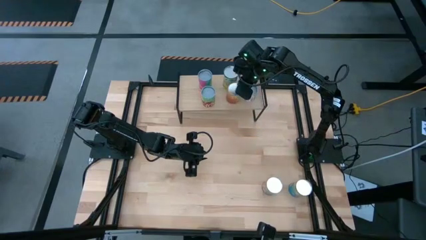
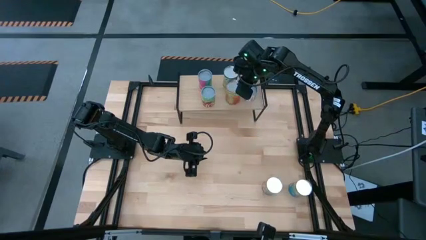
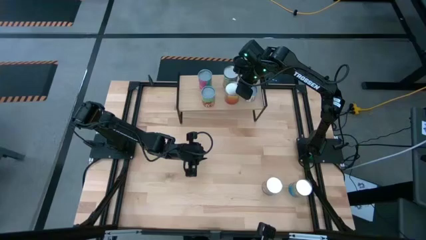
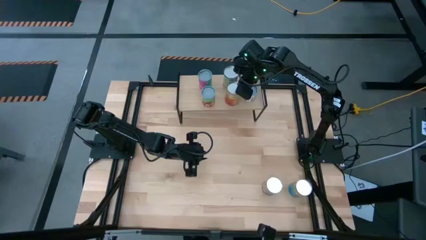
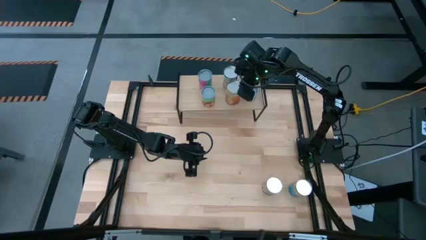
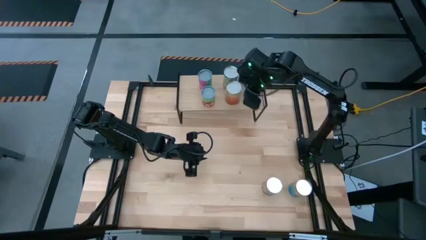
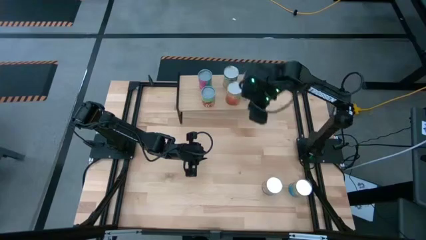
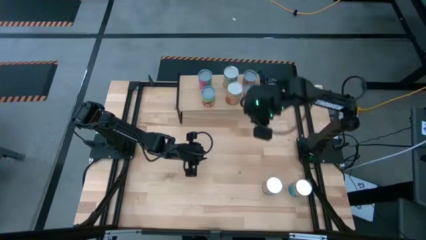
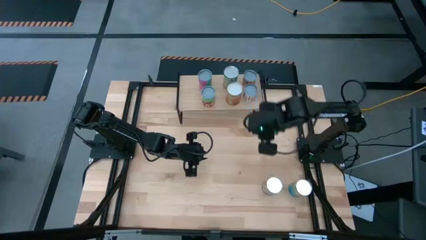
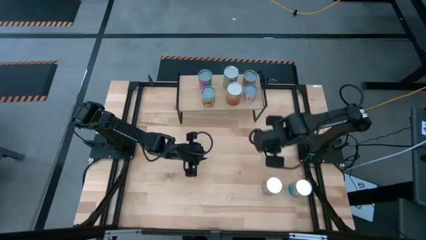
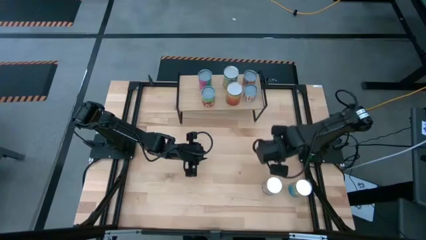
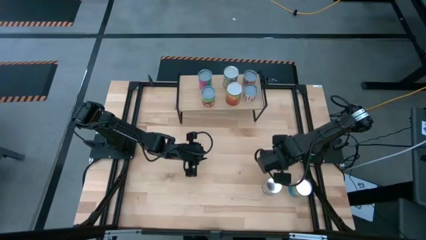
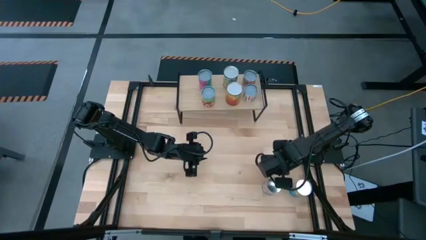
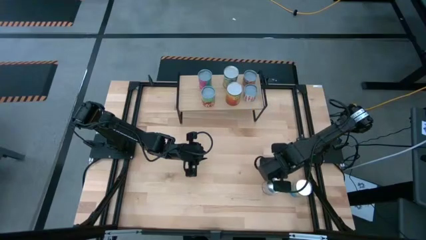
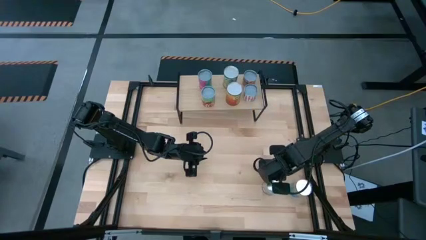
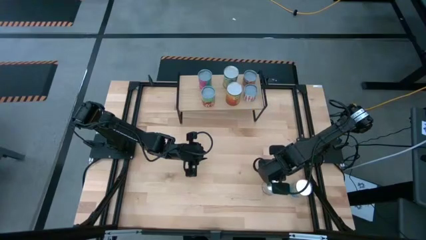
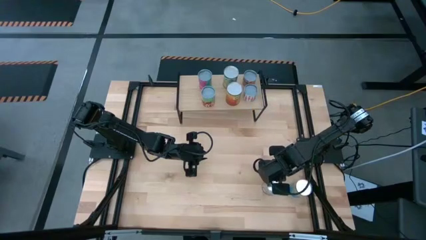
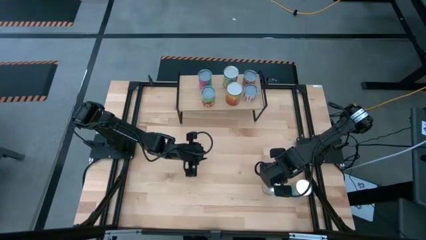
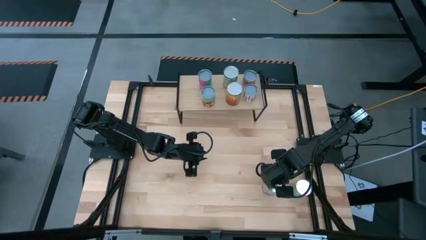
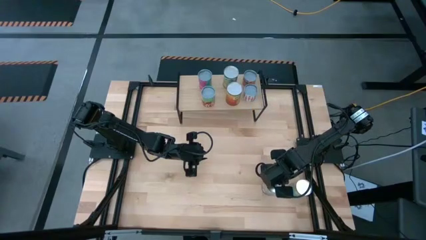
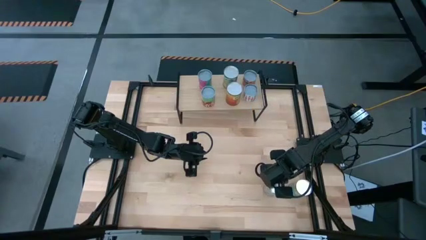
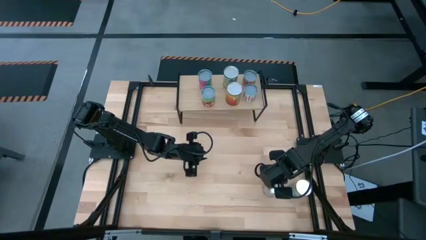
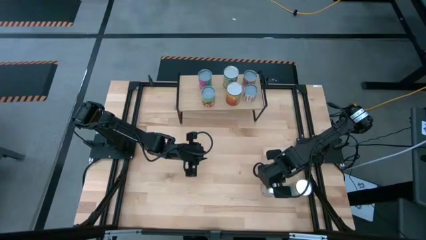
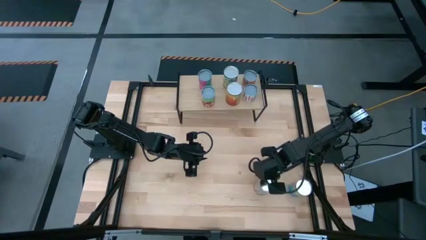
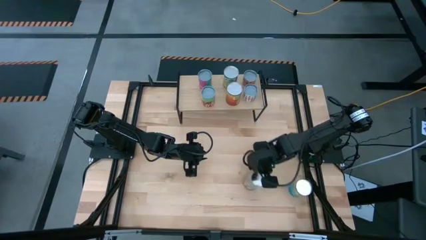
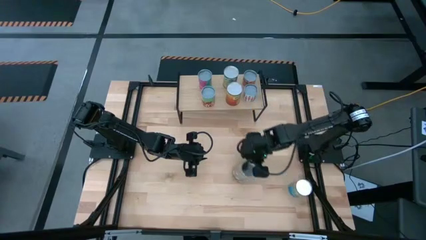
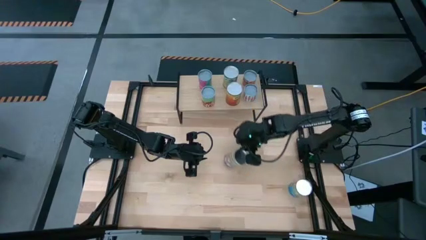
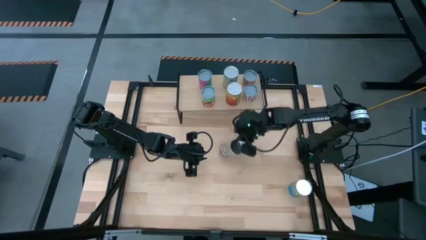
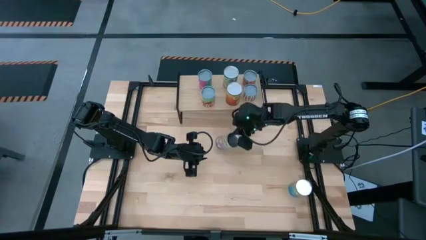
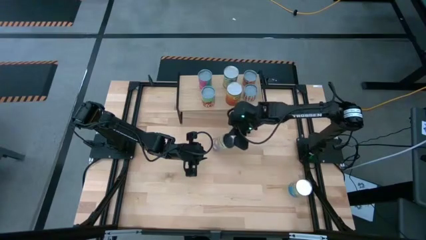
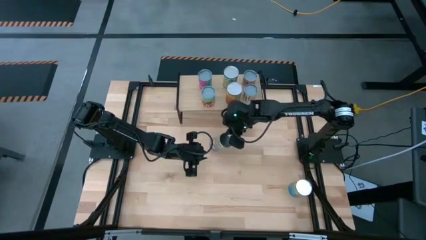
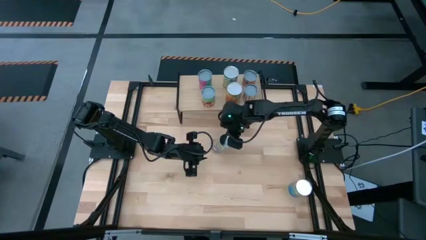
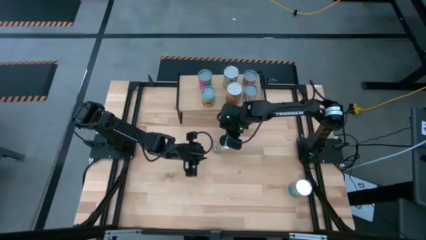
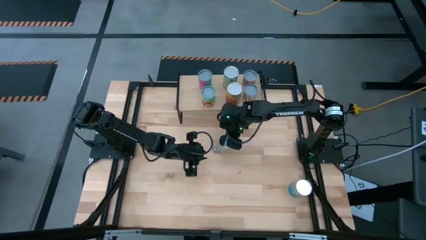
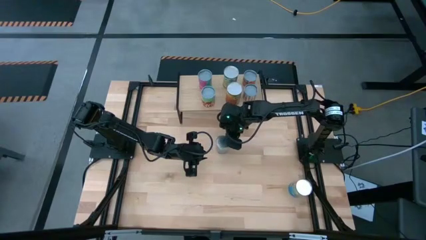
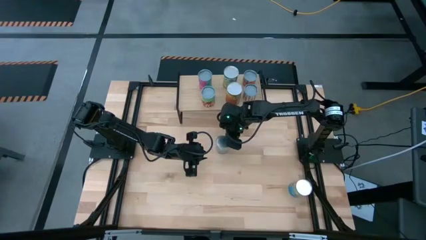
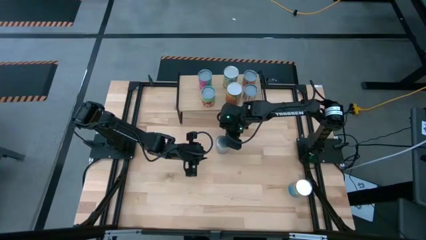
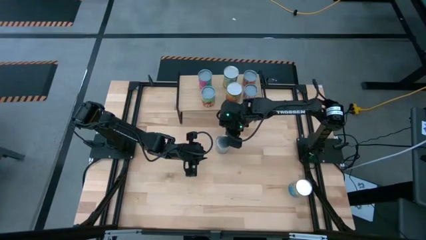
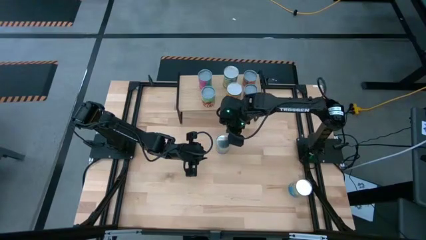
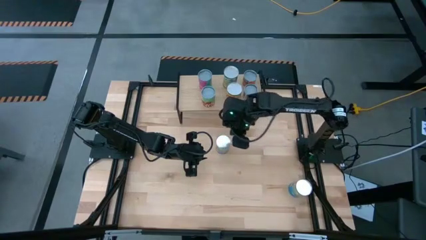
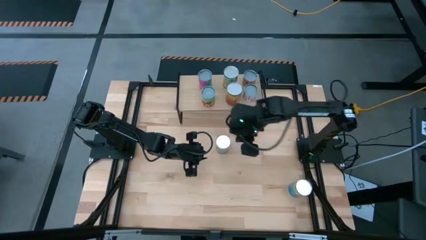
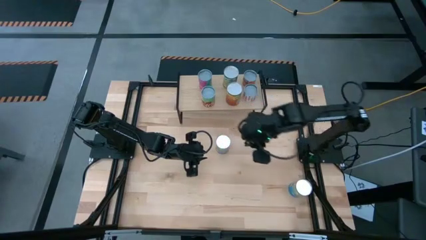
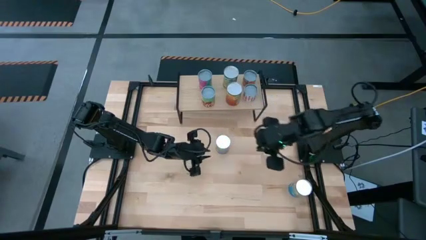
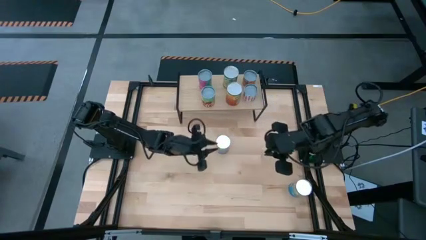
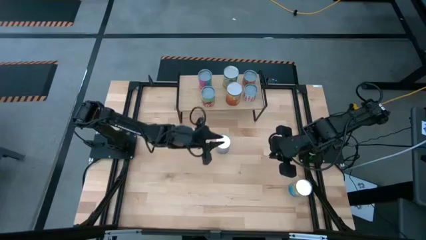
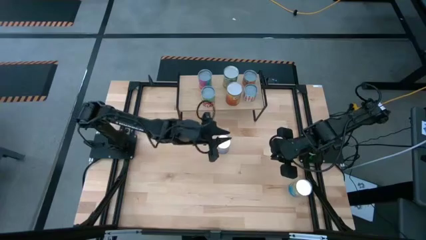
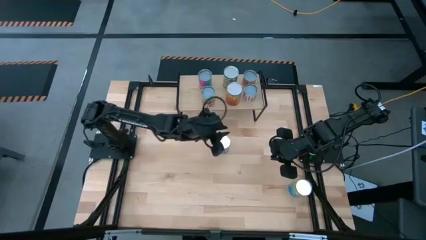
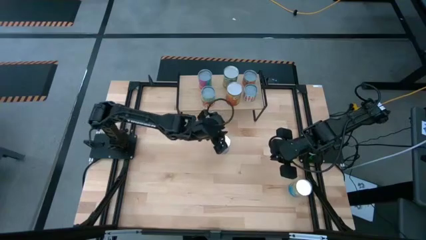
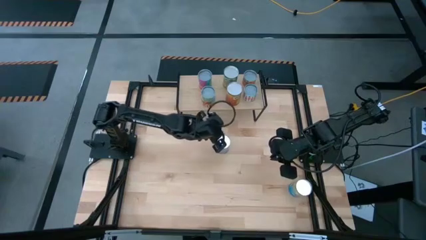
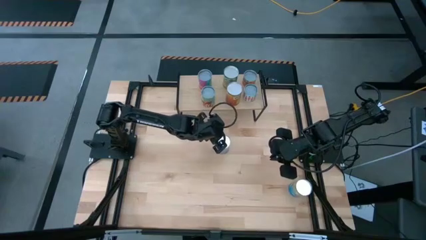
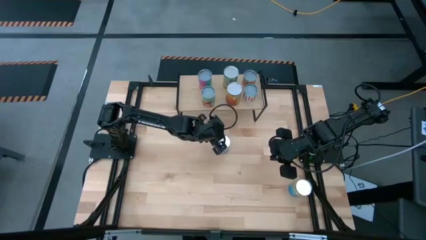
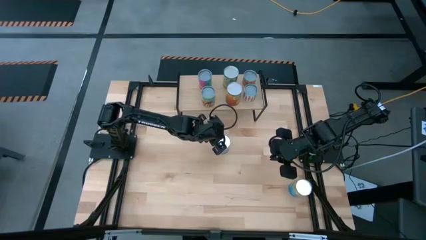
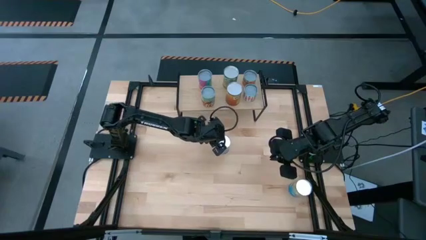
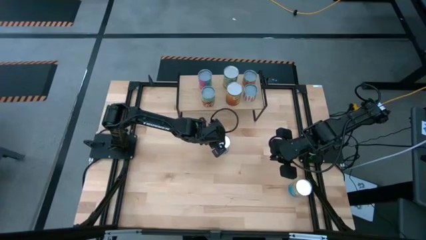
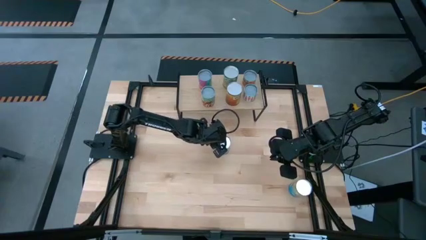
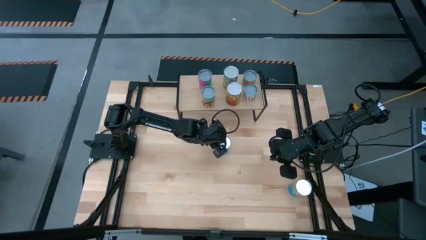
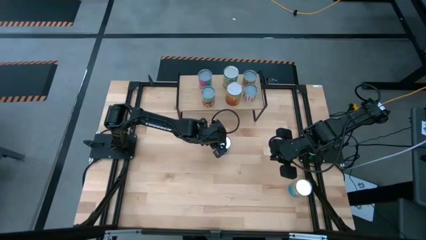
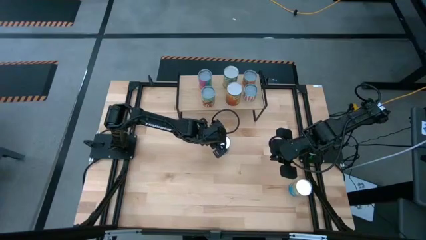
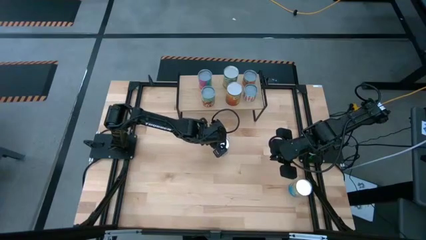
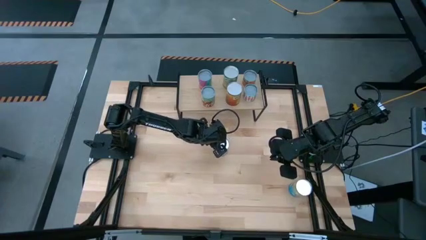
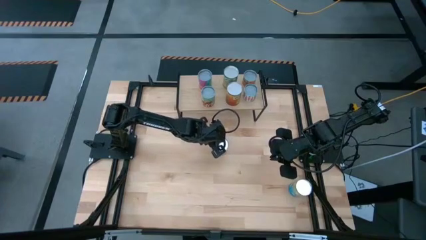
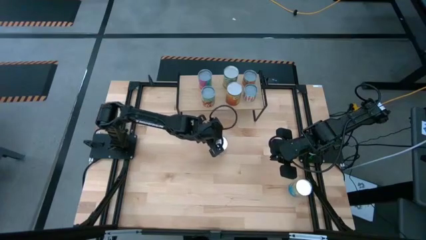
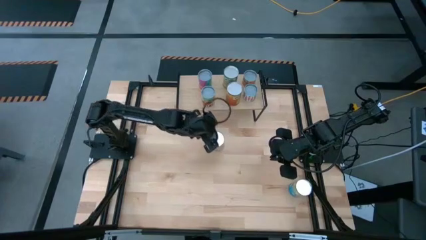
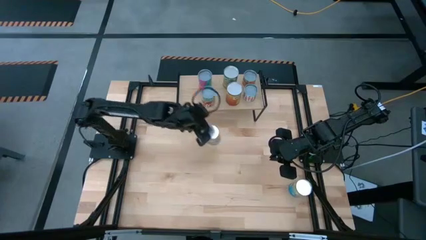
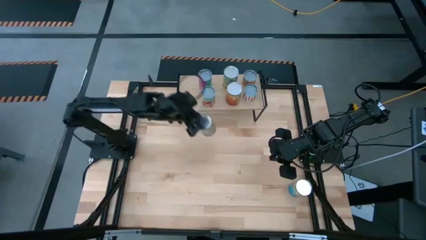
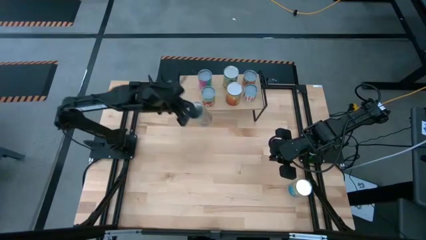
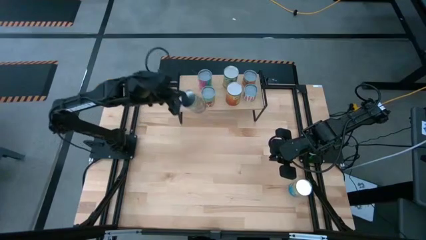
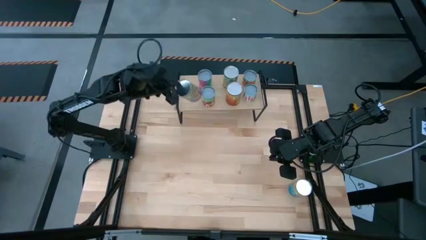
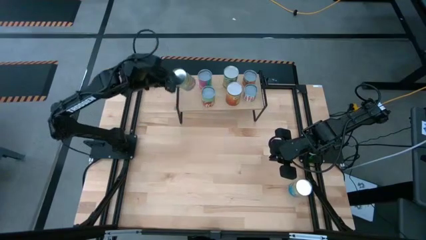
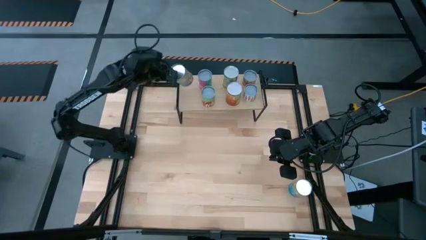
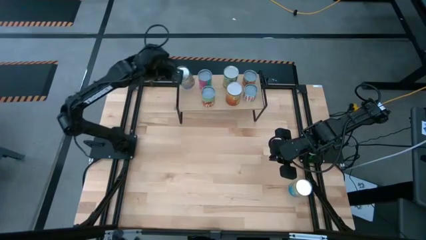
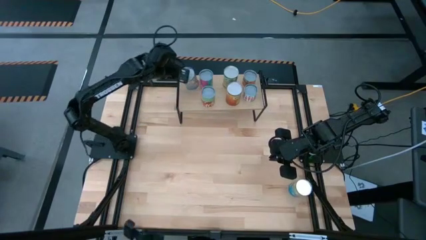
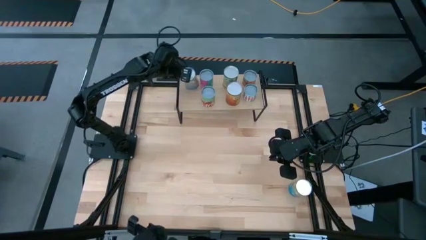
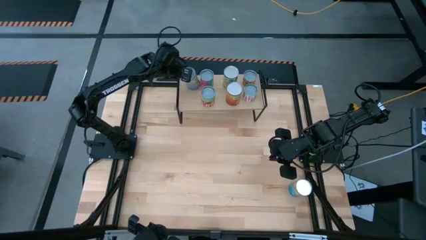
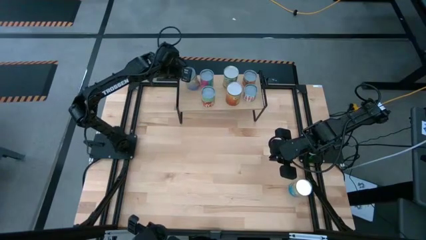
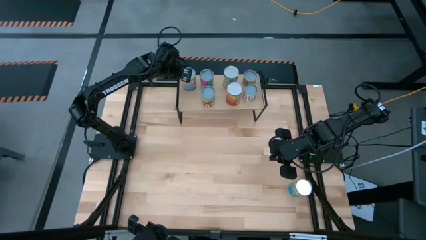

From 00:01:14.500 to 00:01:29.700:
Task: Pick and place cans onto a shelf
Put the canned peaches on the shelf
